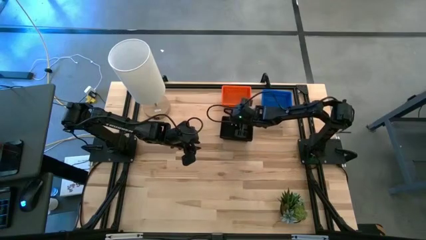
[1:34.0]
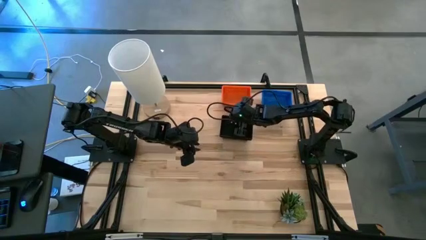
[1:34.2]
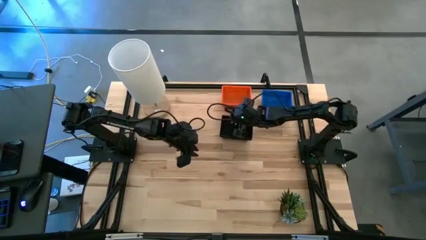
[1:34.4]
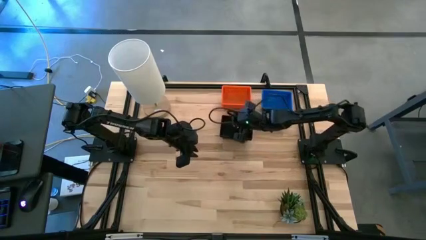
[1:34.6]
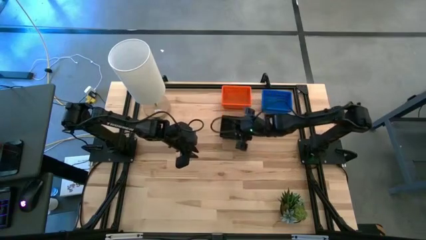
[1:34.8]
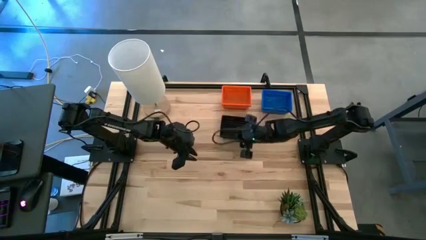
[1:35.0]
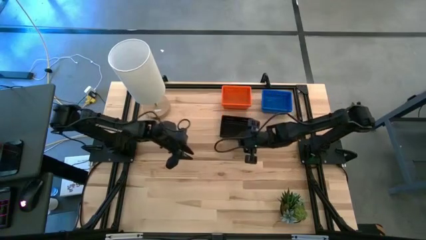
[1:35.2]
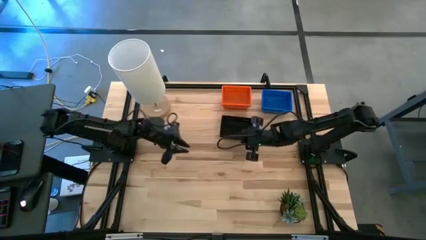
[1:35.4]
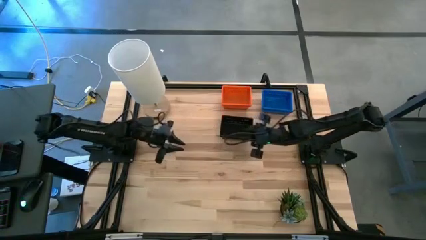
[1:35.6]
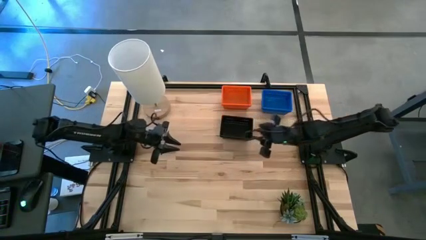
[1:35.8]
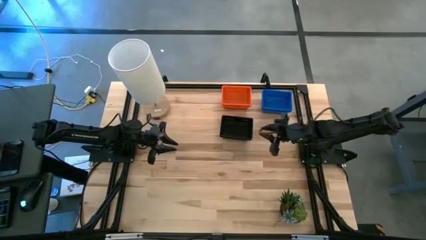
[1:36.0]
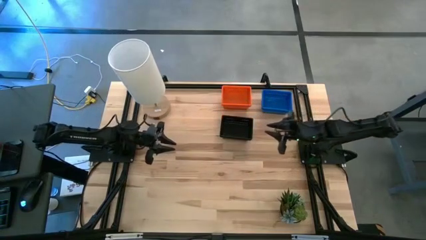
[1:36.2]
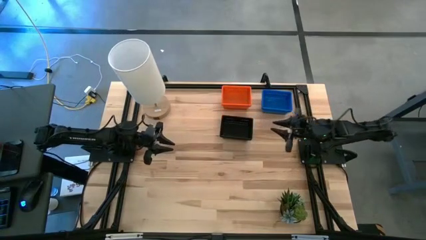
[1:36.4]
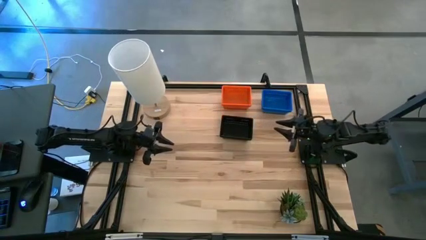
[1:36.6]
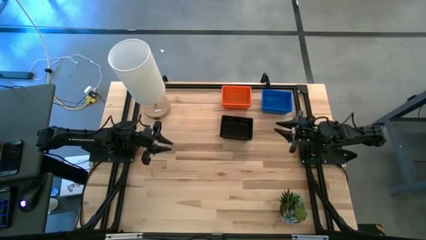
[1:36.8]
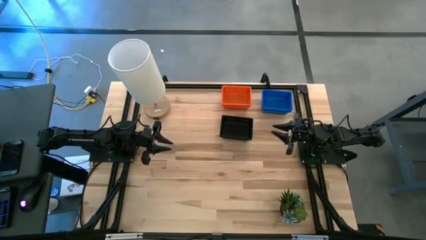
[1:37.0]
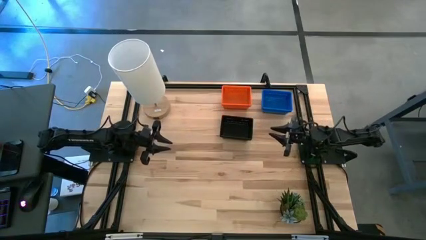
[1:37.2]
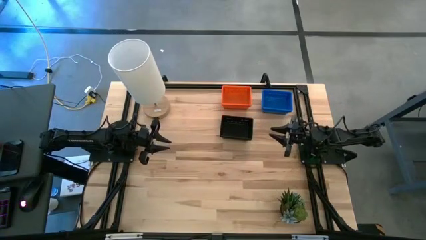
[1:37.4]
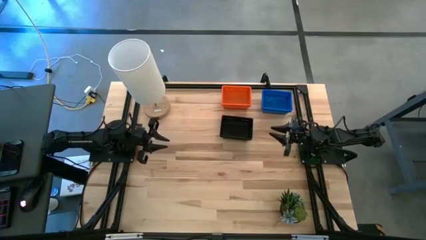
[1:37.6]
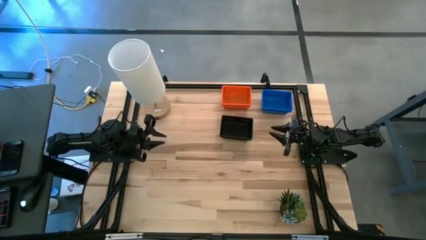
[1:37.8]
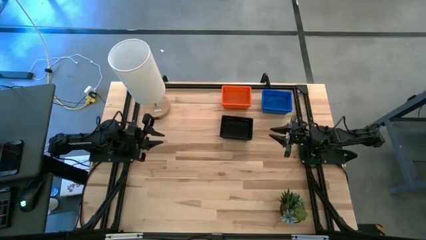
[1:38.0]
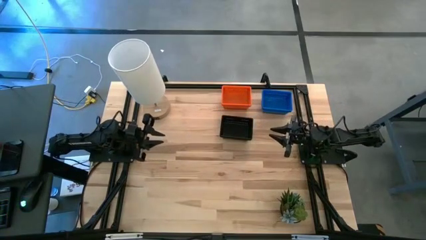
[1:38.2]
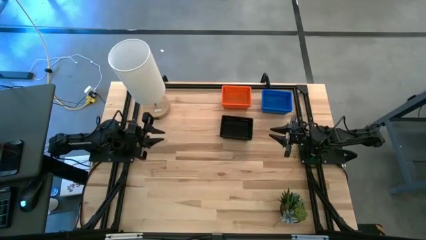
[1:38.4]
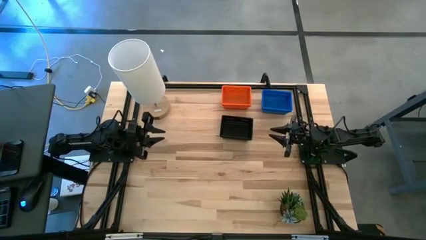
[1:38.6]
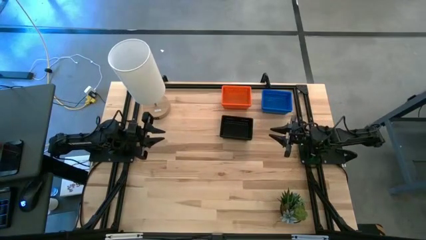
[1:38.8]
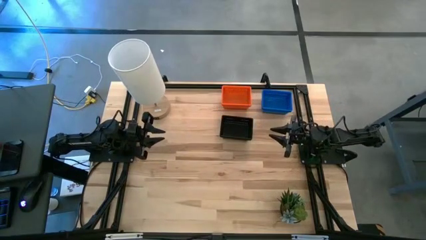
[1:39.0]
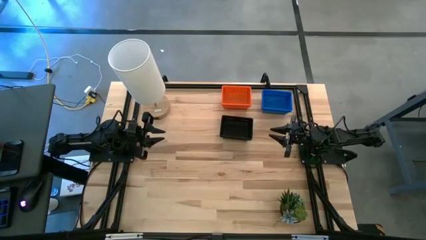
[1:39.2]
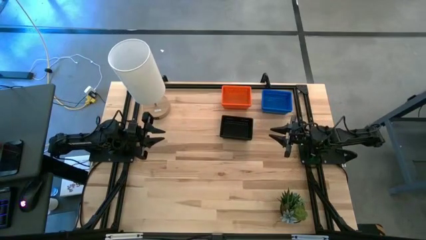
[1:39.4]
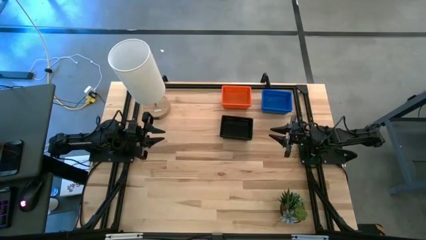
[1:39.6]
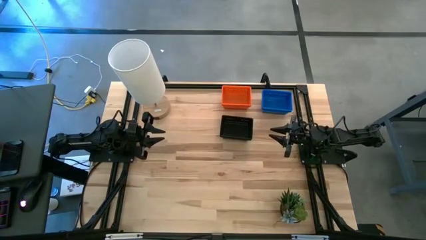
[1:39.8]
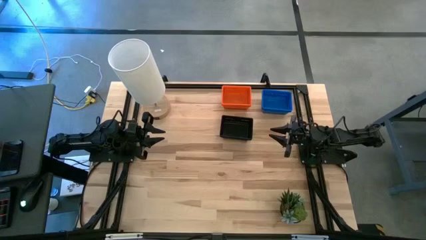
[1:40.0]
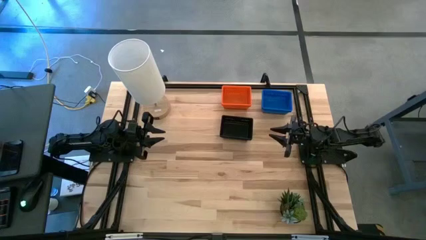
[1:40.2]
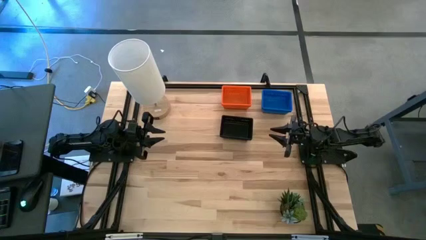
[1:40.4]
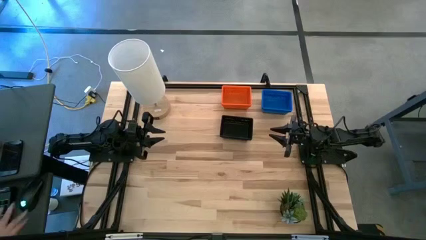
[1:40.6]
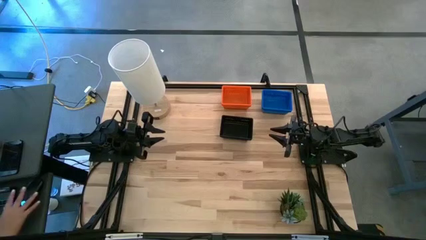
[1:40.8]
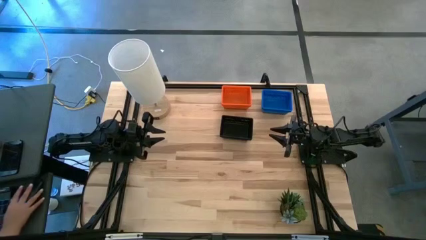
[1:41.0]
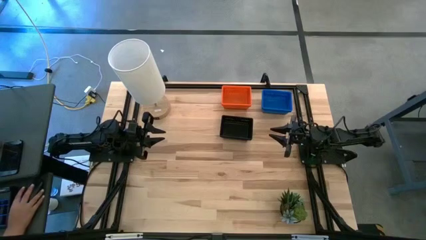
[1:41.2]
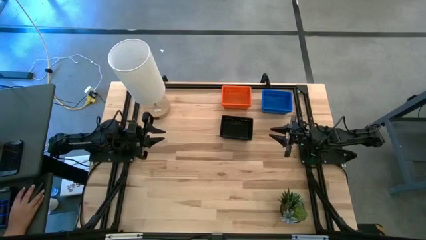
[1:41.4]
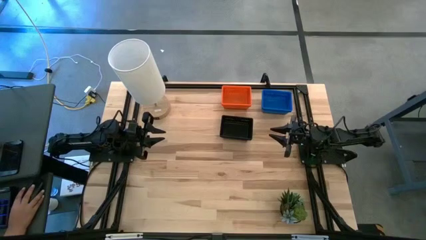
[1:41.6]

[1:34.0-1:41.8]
Return to Home Position

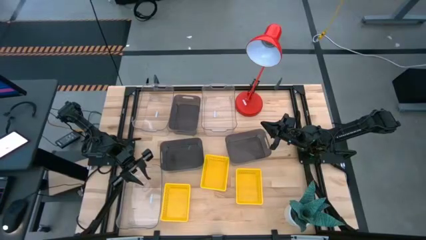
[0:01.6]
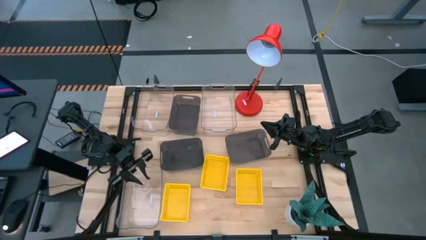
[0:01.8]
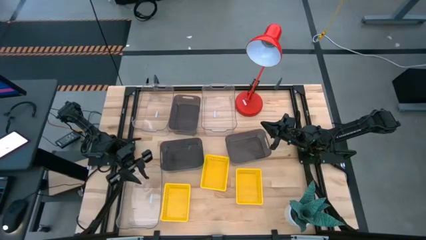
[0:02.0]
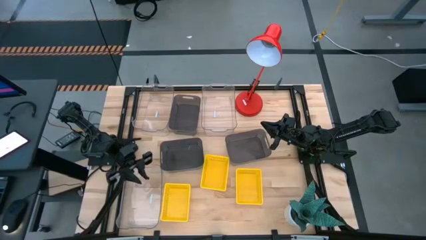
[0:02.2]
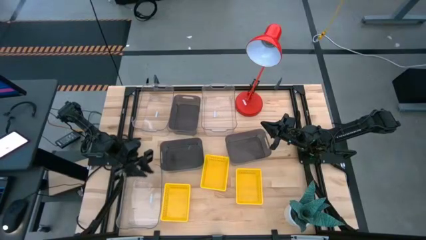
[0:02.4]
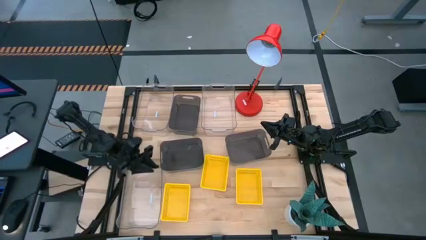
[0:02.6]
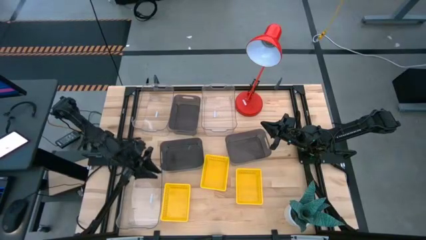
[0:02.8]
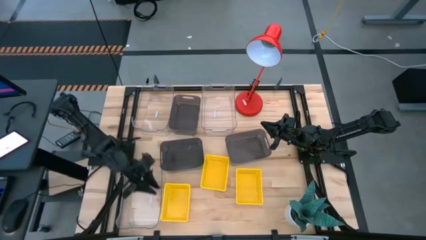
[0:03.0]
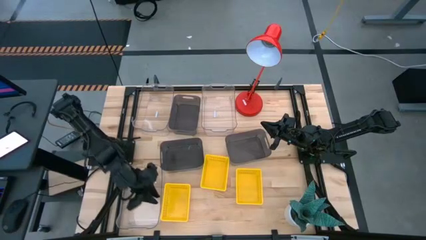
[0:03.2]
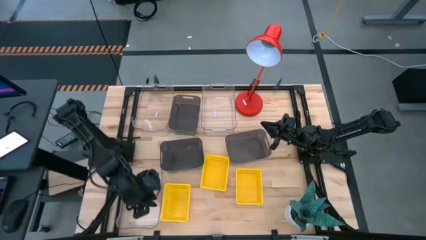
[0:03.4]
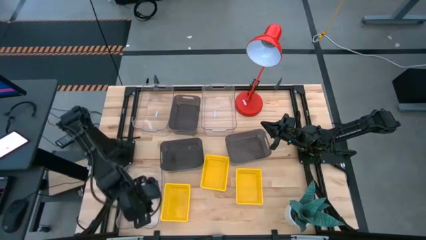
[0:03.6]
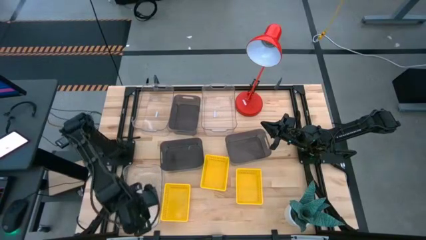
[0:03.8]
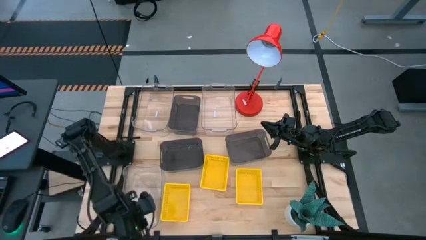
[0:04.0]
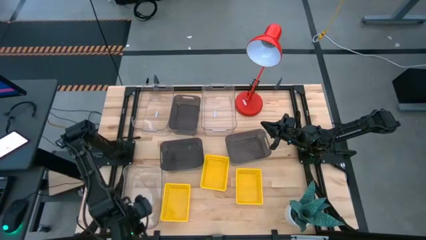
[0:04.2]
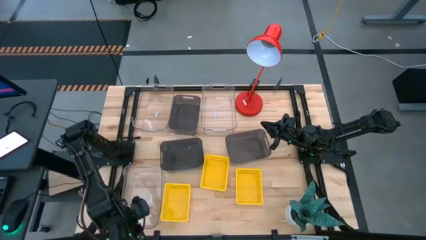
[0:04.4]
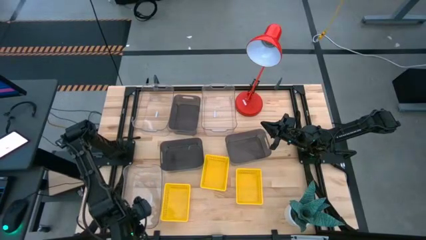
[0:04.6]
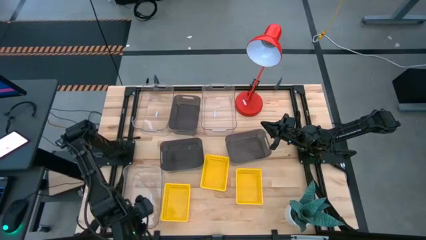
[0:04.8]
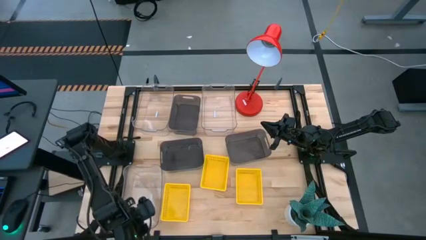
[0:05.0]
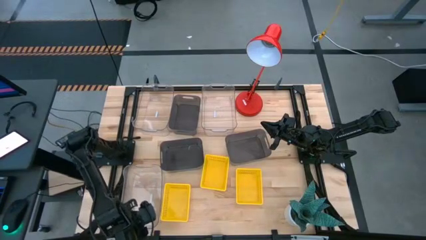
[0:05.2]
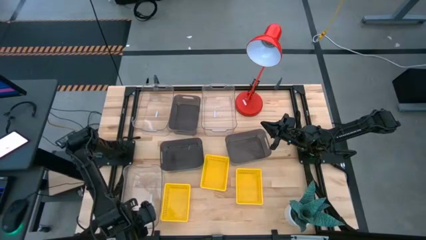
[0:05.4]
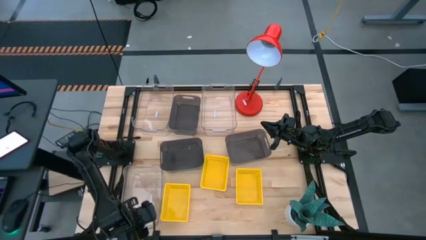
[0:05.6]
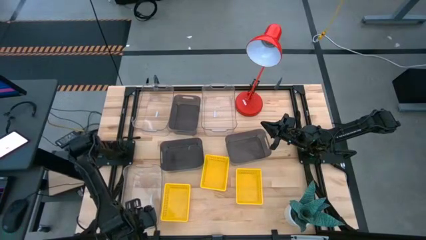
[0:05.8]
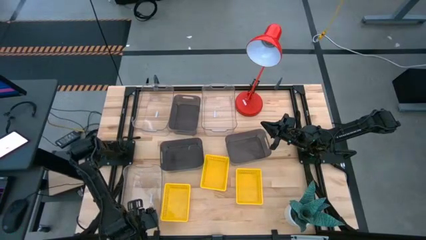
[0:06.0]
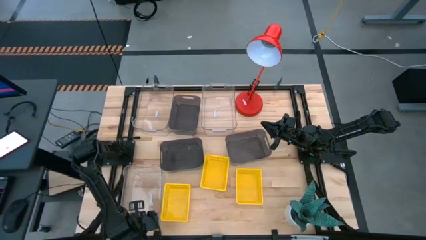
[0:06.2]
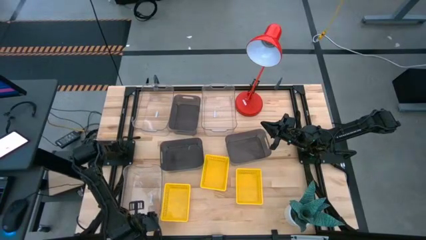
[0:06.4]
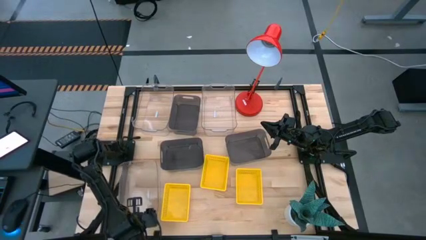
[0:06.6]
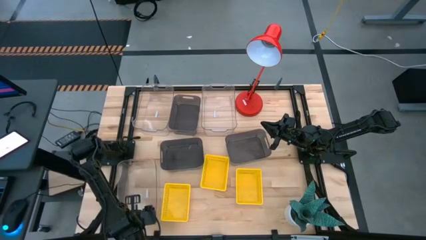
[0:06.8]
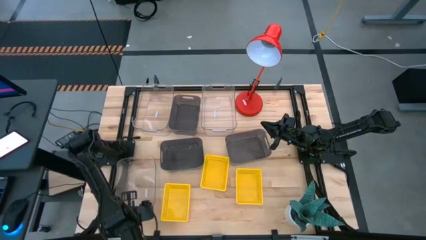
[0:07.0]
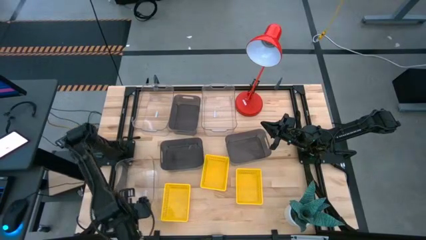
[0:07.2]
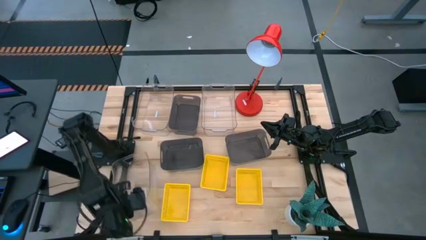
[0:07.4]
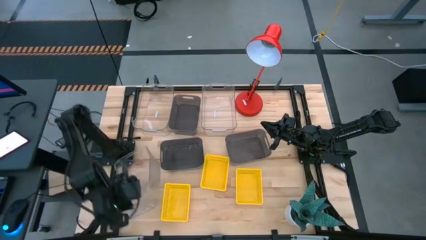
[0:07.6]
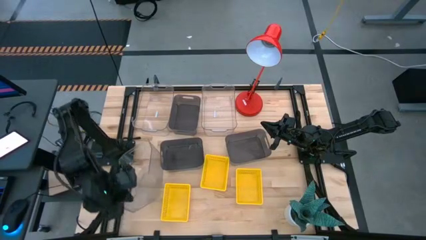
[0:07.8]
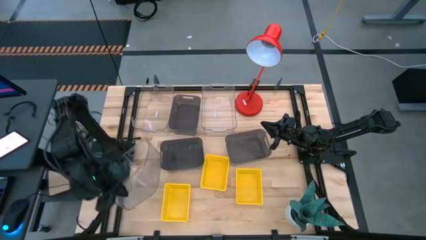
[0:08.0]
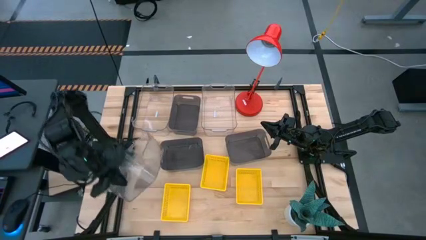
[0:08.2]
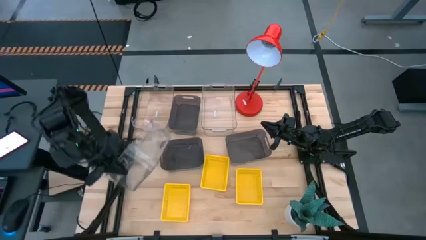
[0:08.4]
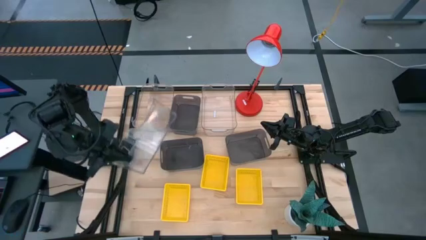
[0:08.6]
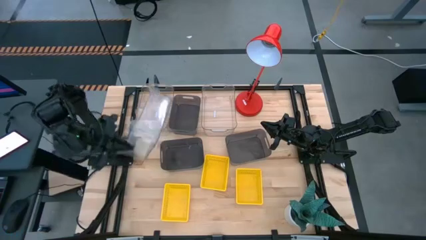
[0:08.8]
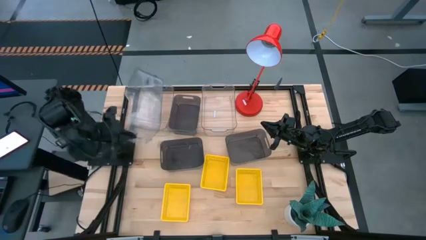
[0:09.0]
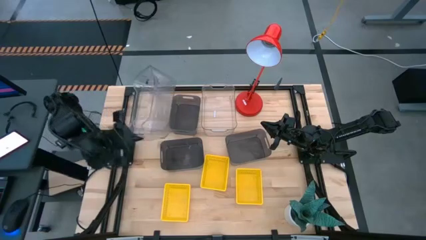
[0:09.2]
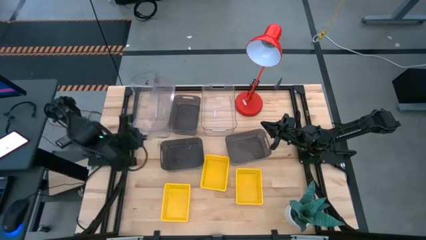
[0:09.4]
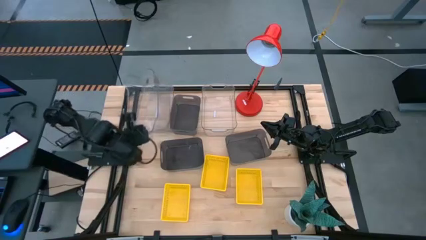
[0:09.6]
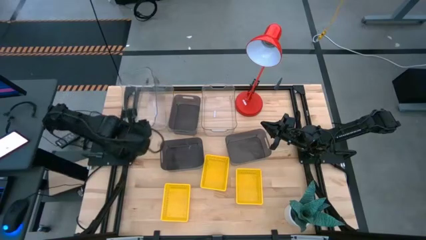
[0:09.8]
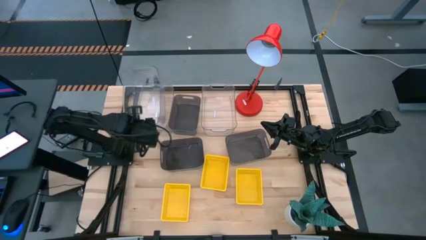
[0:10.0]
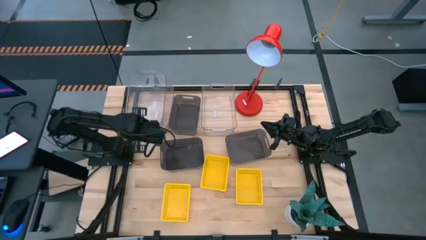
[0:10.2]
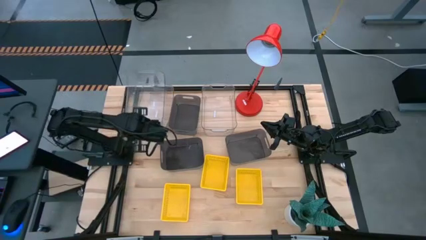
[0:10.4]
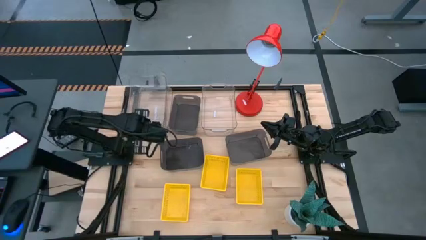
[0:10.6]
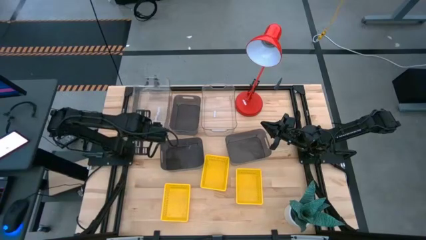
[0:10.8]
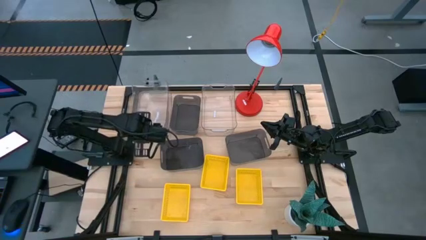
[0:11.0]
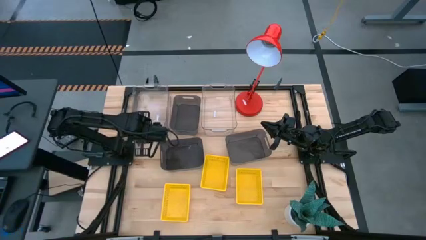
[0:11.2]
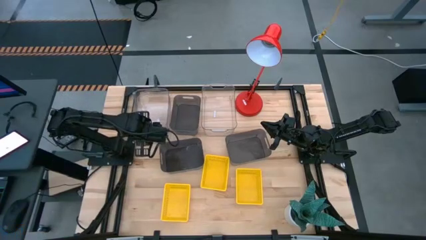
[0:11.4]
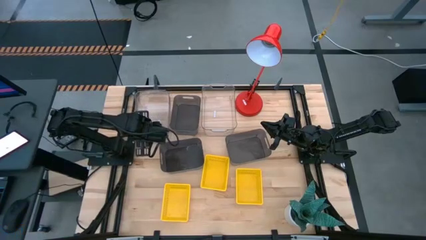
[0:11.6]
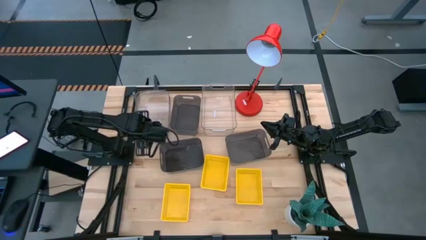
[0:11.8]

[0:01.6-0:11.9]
Stack the bottom transparent bin on top of the top left transparent bin
